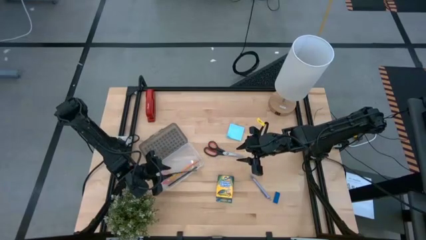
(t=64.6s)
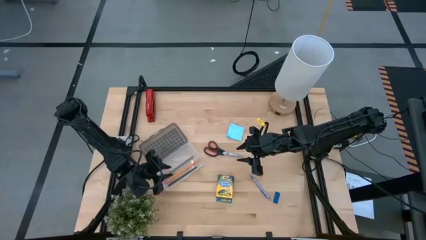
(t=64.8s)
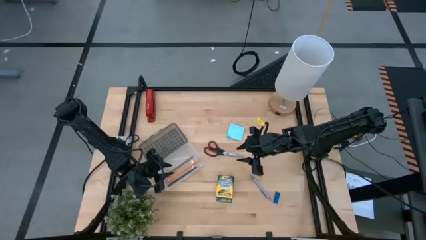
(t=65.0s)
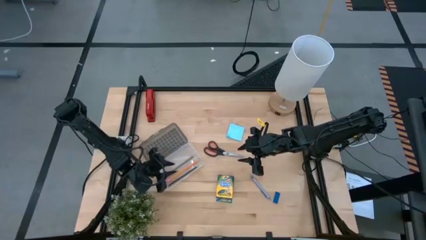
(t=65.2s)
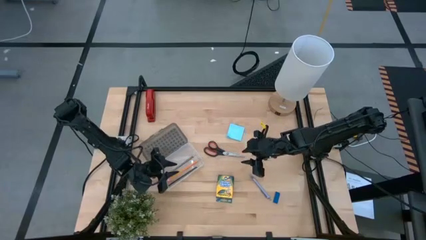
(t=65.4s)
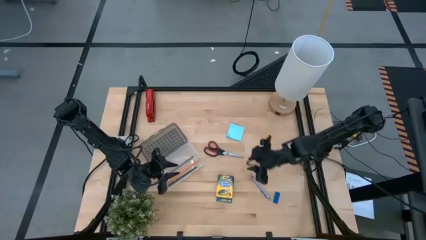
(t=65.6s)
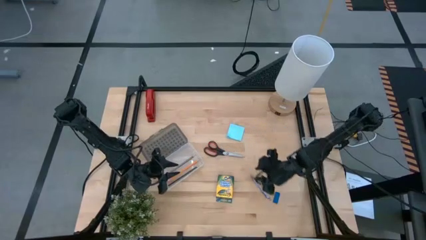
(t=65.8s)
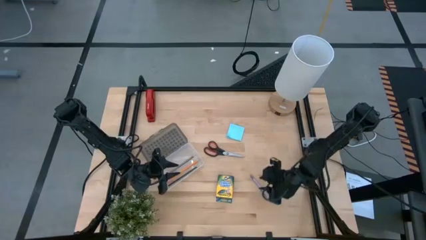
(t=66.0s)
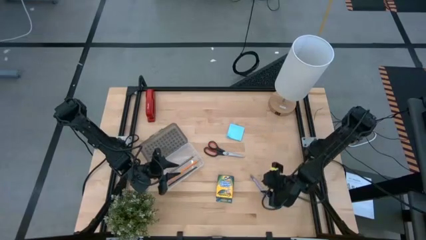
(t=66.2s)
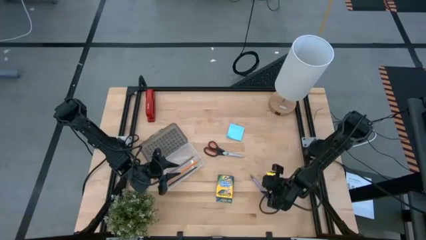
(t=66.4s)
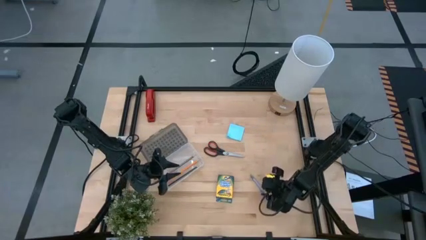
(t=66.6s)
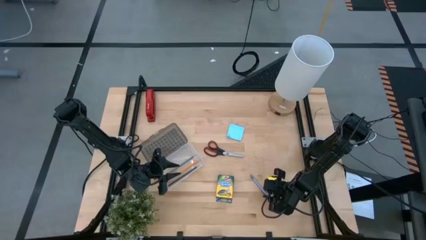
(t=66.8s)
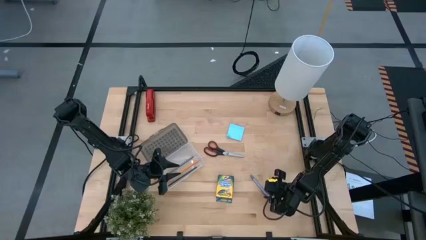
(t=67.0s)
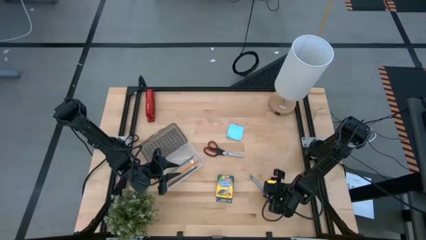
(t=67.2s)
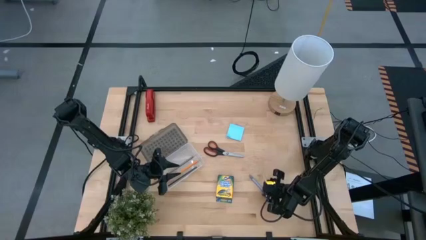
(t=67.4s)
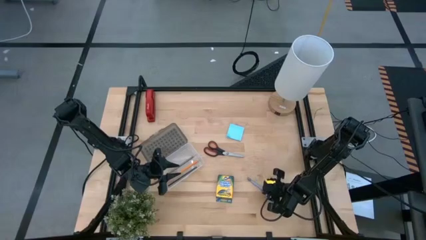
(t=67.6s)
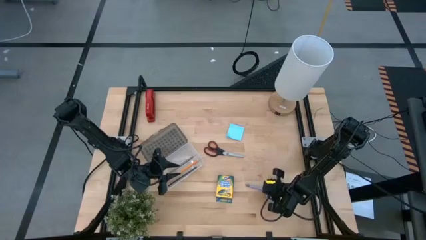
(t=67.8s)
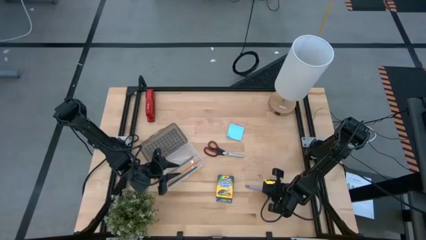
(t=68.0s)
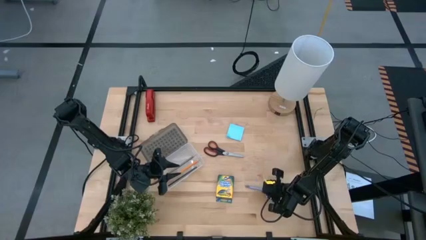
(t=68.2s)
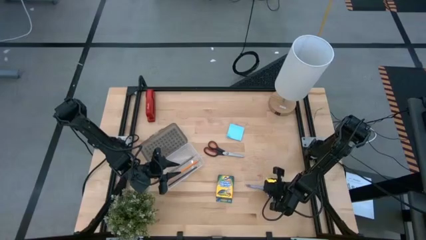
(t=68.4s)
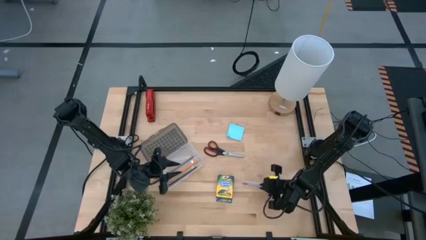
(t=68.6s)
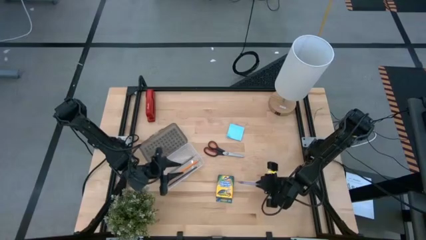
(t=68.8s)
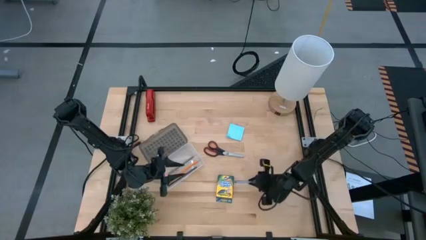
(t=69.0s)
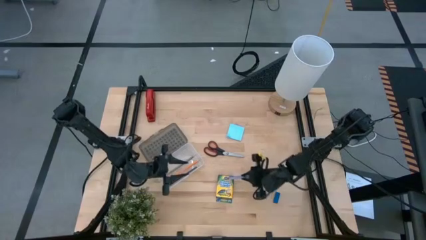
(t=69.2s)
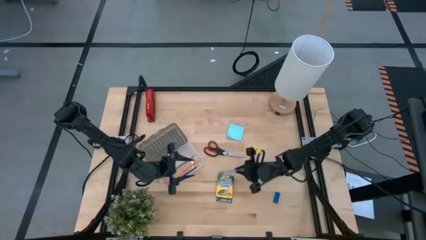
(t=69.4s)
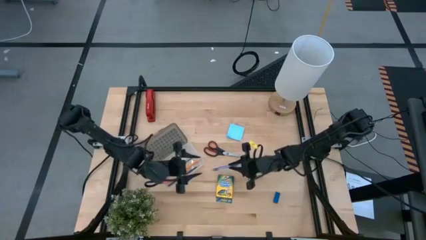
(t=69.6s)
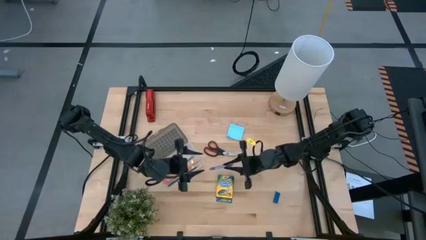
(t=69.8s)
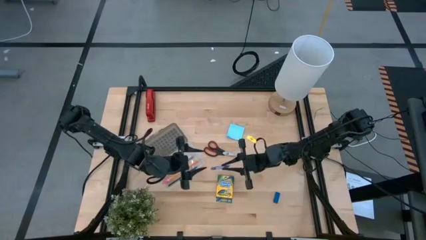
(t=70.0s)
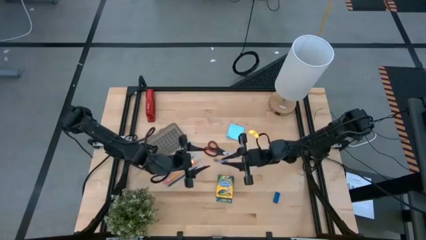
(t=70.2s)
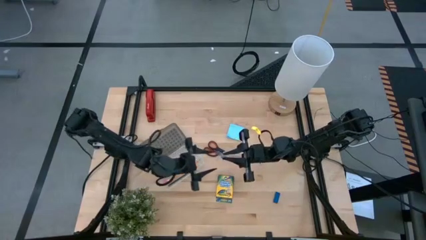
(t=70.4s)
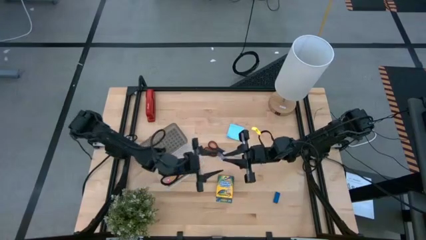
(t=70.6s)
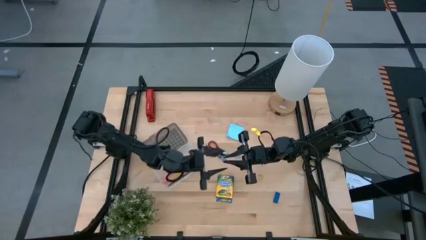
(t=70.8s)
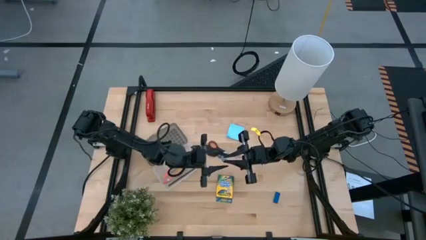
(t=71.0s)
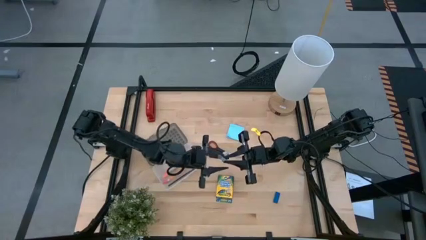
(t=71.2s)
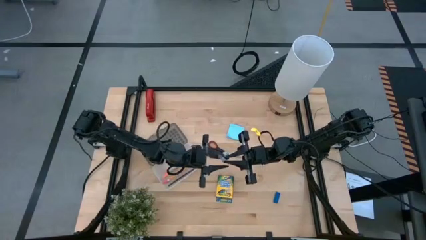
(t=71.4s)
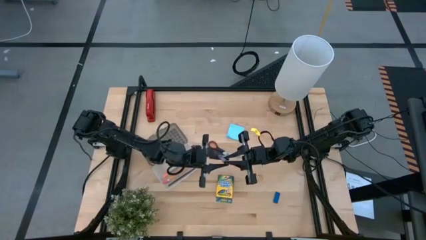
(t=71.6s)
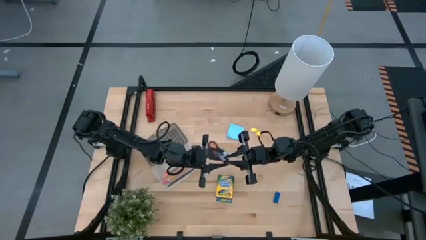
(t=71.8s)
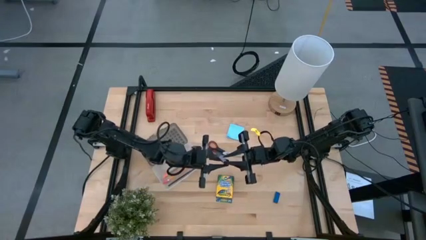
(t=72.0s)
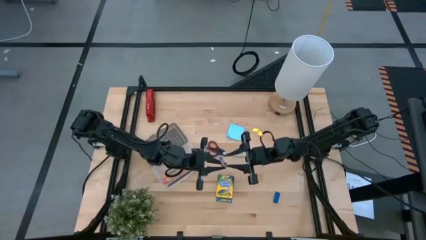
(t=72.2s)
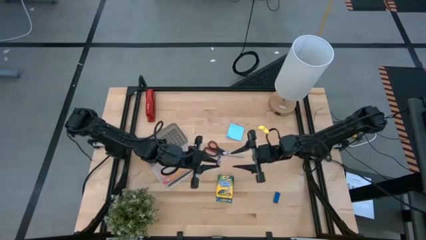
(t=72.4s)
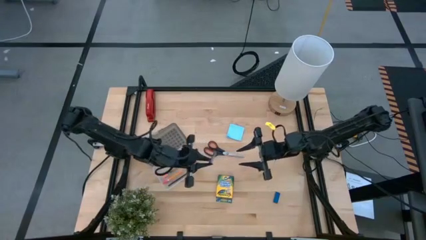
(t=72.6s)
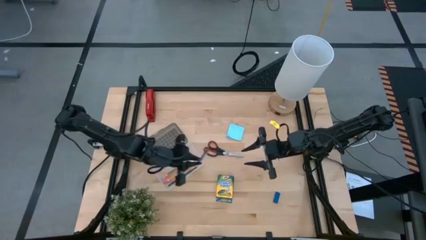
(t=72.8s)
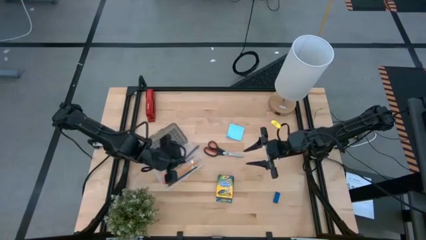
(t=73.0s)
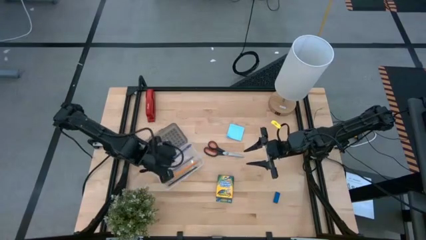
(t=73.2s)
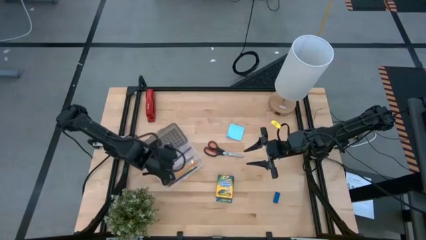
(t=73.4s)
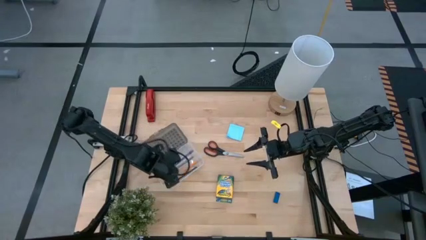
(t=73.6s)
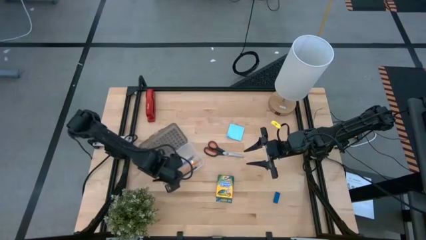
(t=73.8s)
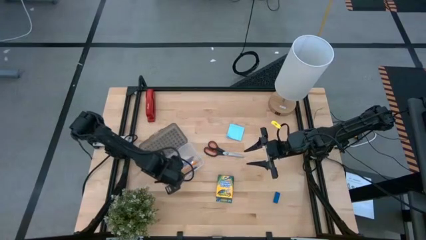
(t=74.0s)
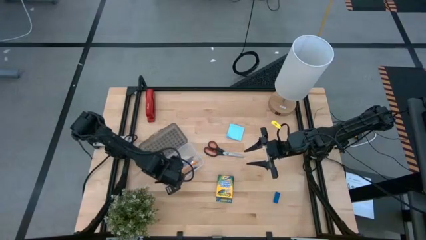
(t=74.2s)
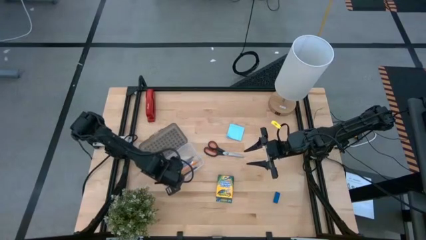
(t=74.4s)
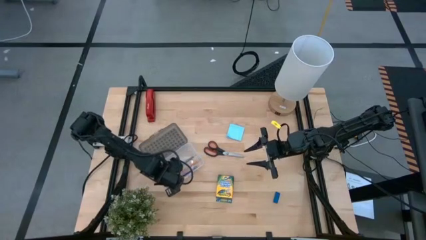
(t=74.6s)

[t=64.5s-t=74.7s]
Task: Pack school essentials
Put the blue pen into the supply box

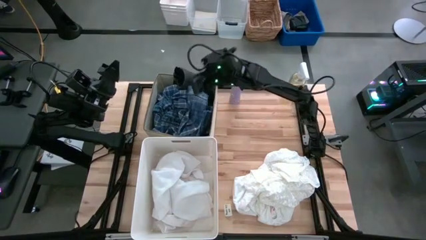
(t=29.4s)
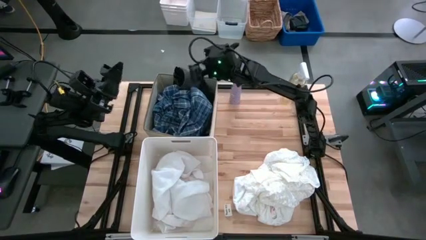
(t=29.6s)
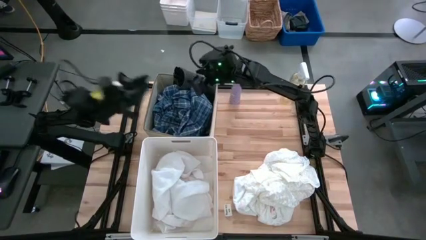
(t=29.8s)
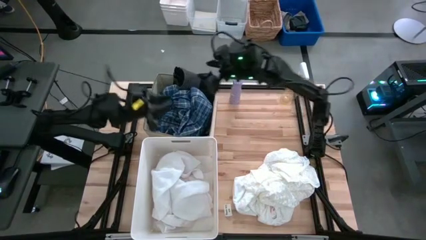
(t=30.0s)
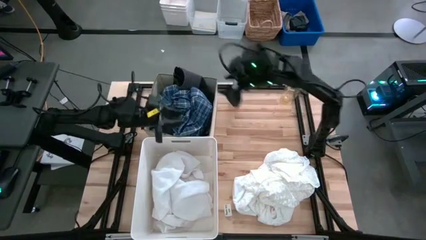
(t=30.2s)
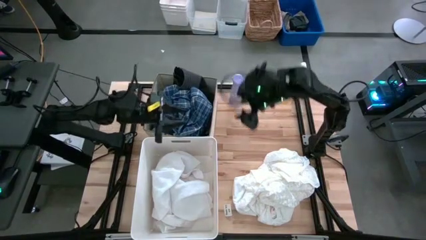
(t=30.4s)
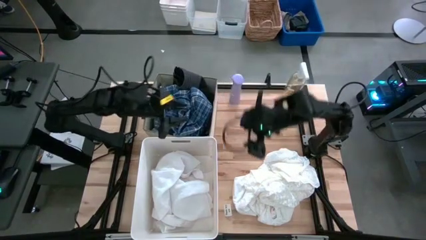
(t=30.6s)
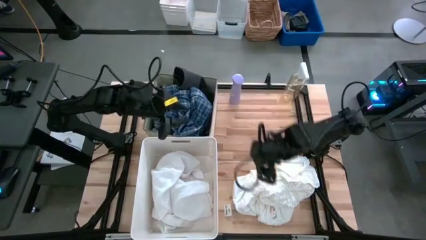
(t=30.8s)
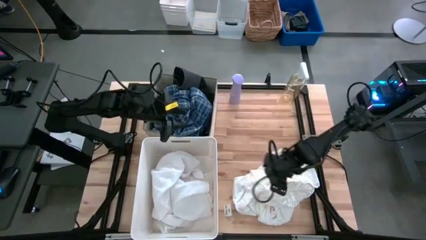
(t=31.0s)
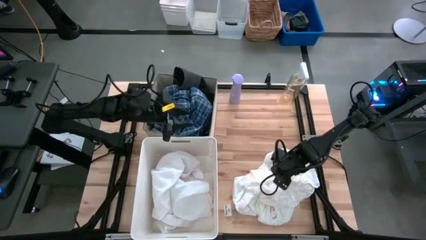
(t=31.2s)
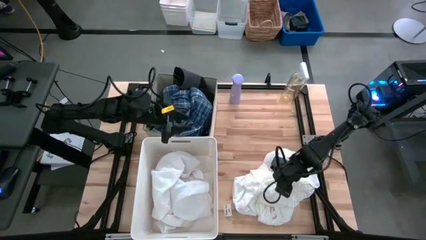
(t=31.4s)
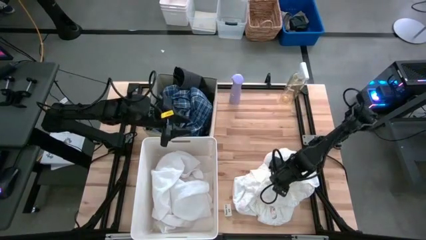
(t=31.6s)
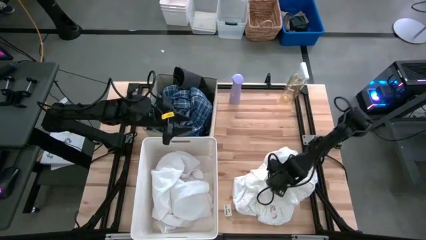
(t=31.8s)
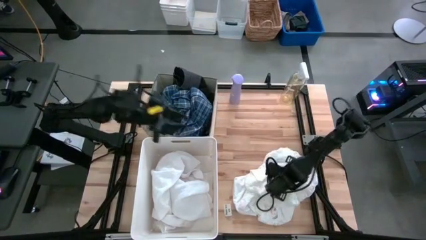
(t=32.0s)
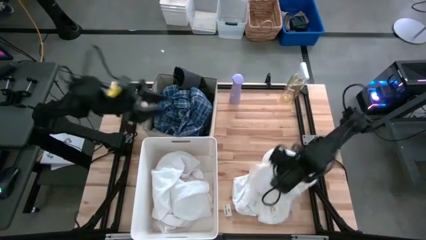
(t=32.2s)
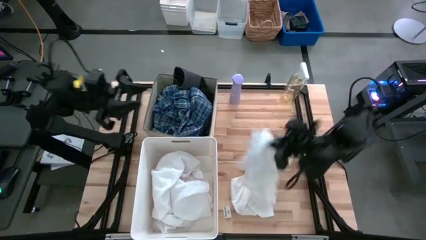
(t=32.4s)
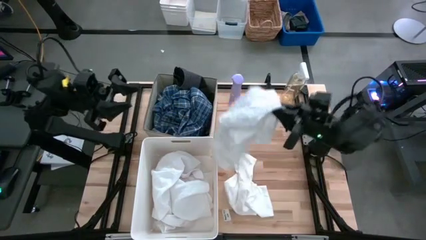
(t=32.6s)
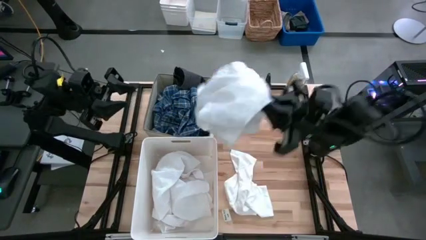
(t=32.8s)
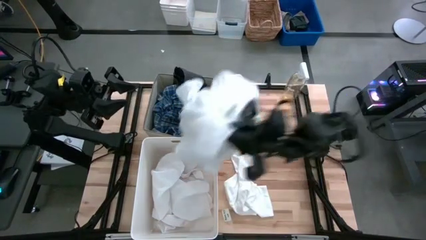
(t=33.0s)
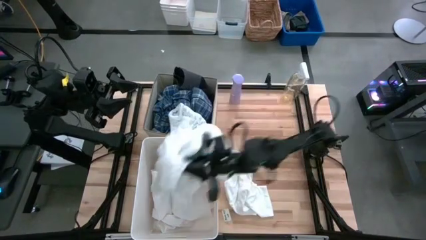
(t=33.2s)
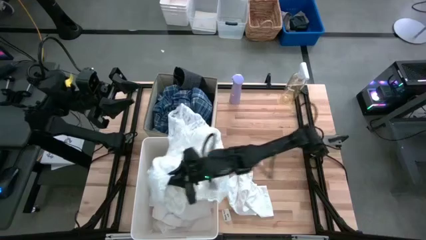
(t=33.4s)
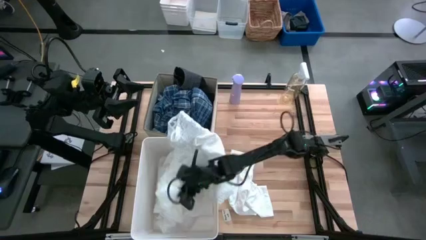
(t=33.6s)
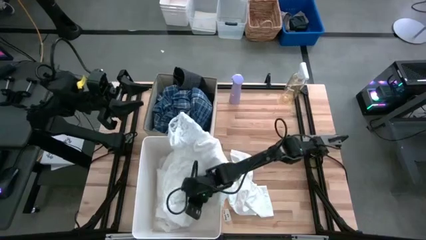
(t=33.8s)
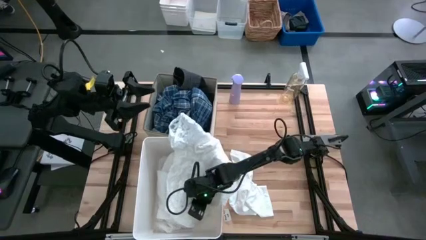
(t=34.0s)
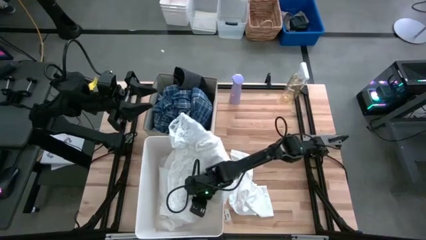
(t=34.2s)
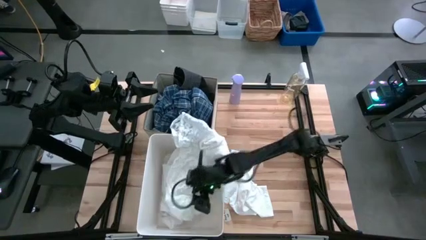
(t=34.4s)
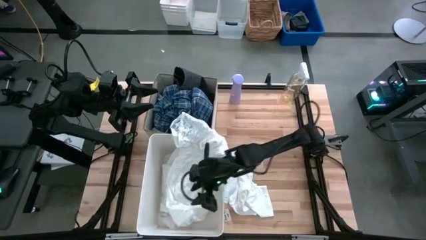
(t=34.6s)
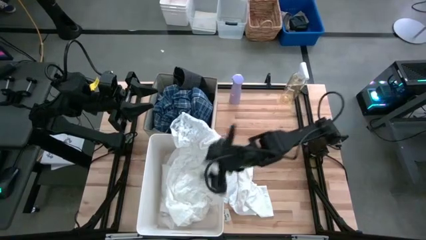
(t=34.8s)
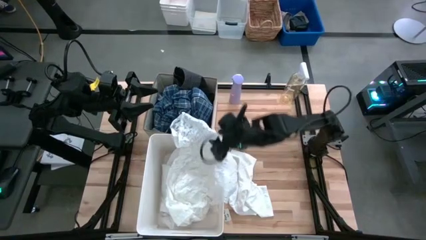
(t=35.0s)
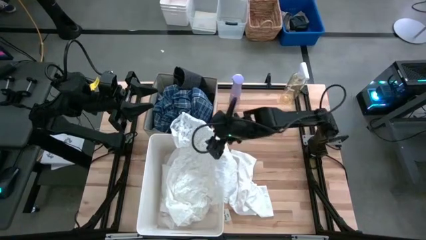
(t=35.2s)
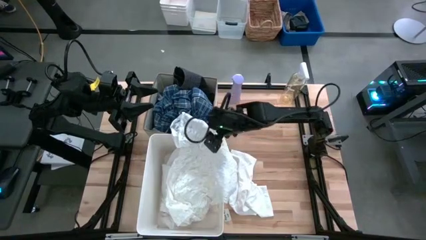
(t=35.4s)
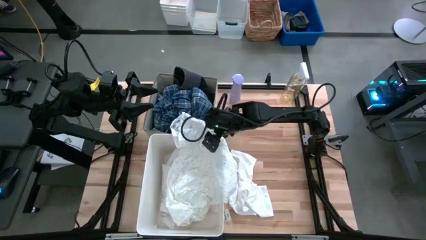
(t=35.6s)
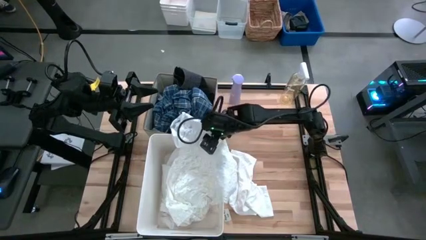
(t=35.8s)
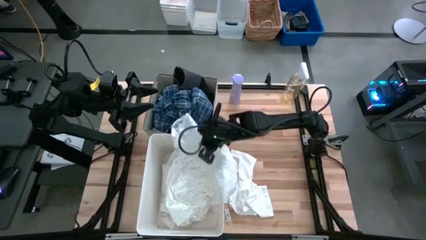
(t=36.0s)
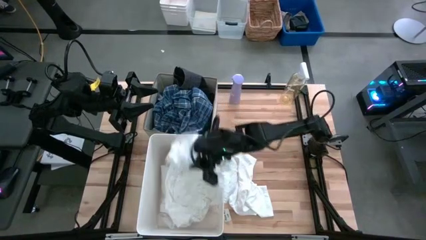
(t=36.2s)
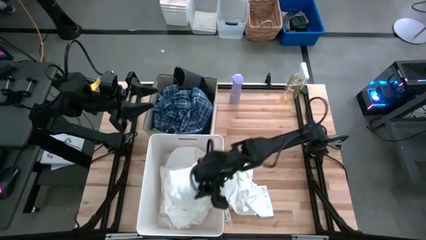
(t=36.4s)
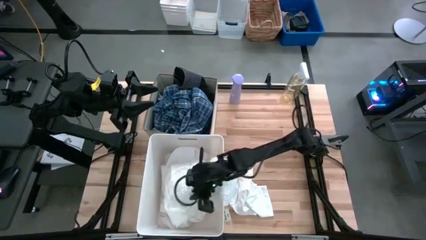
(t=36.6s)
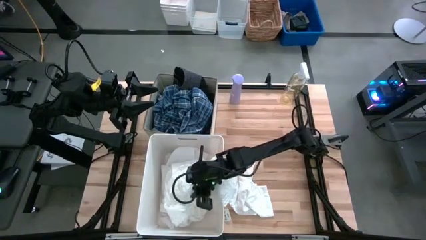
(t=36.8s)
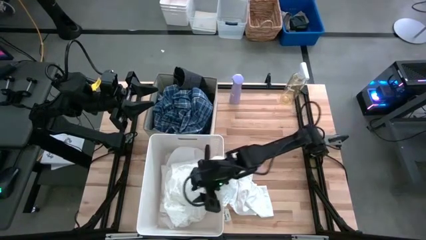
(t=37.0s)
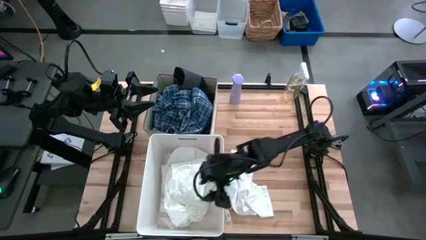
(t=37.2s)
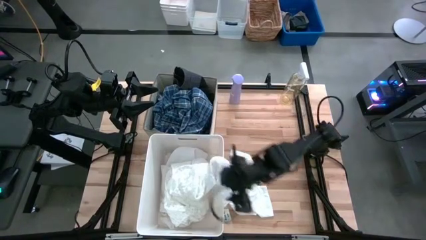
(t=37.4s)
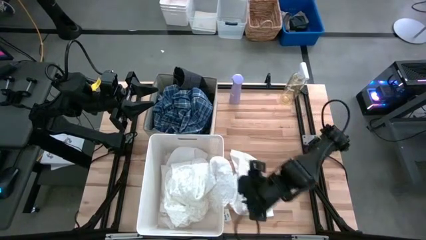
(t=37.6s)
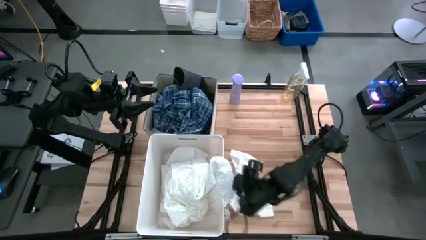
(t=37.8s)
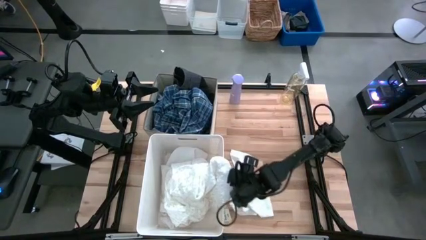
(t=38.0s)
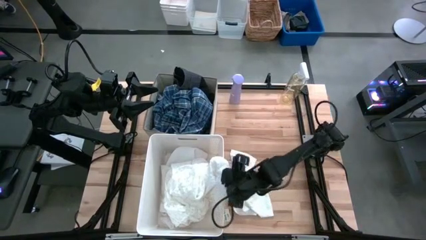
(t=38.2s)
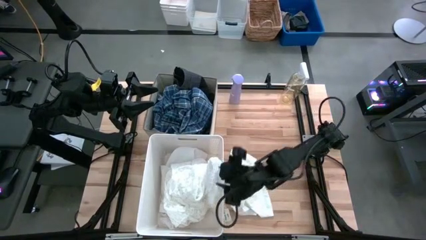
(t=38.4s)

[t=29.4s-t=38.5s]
Task: Sort clothes
Put the white blouse into the bottom white laundry organizer
